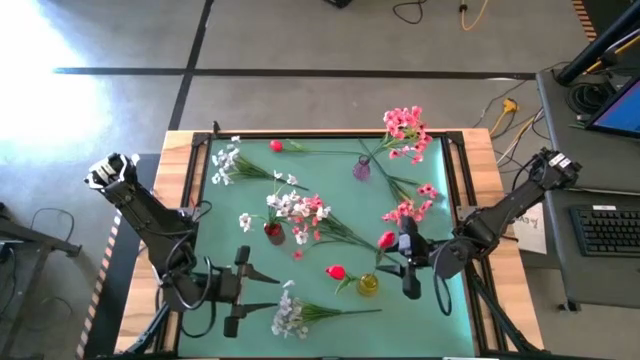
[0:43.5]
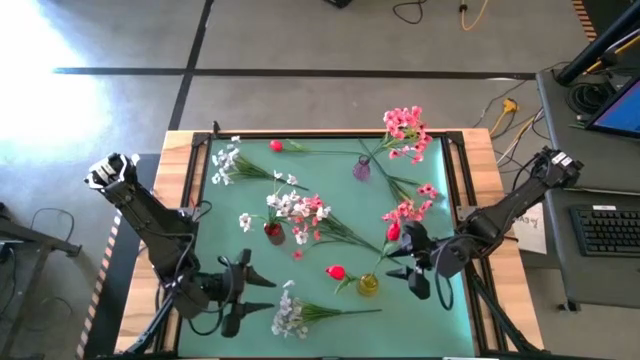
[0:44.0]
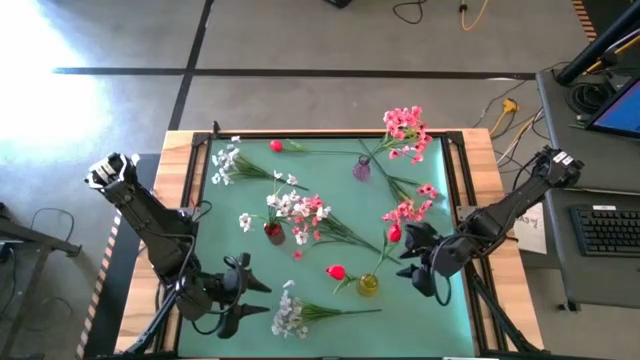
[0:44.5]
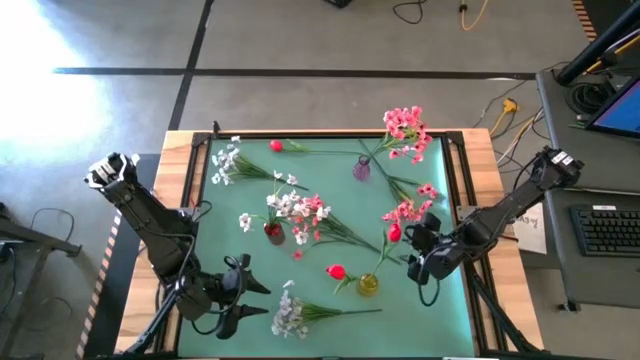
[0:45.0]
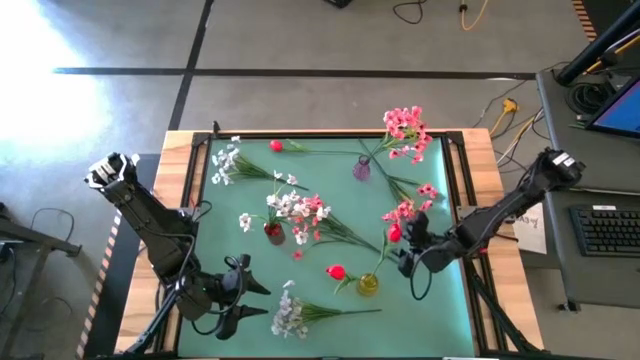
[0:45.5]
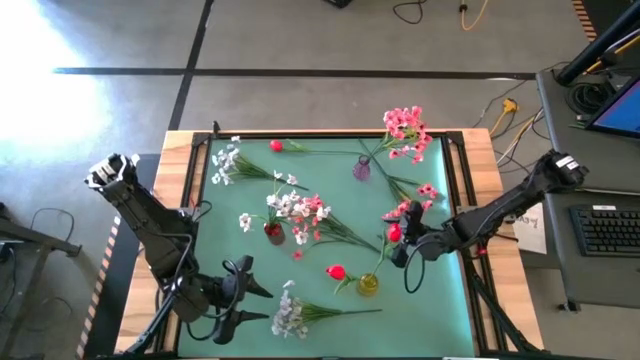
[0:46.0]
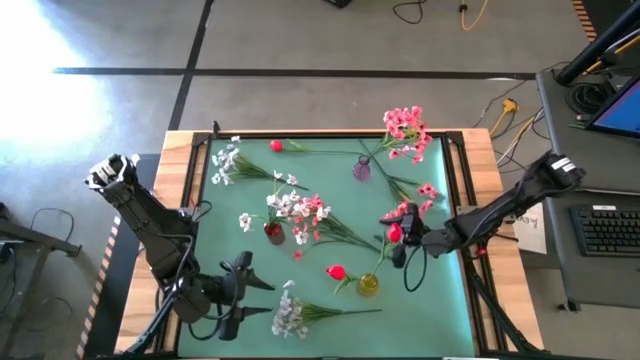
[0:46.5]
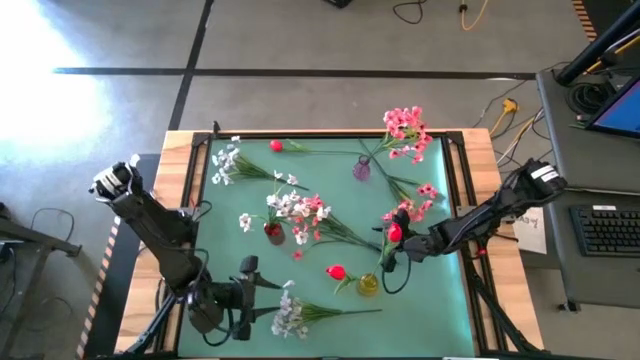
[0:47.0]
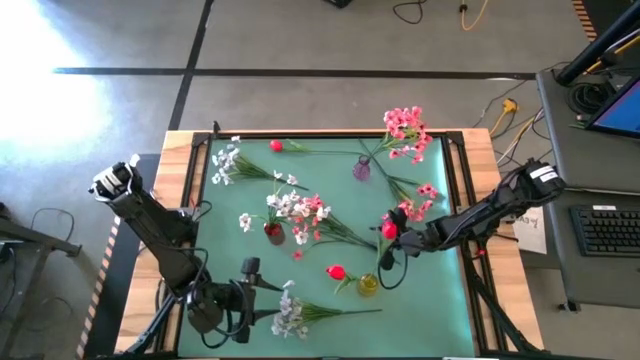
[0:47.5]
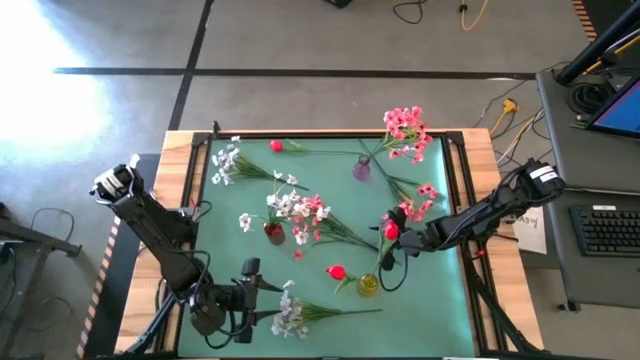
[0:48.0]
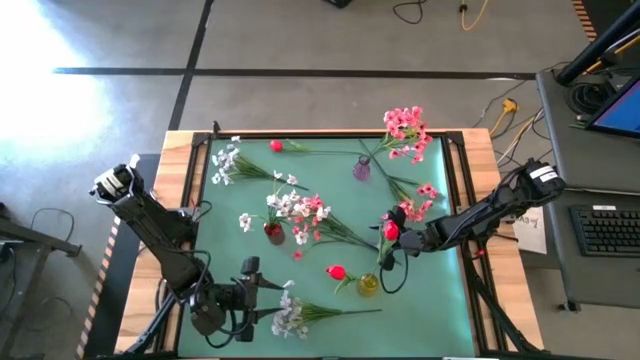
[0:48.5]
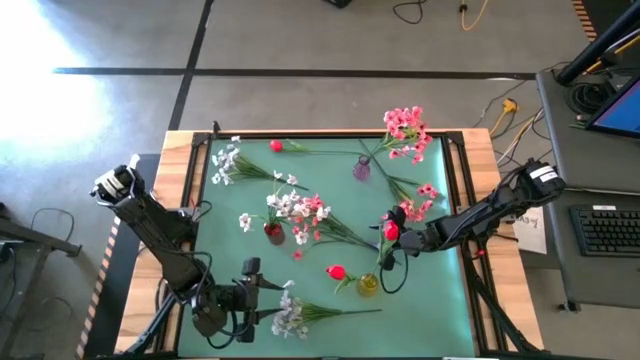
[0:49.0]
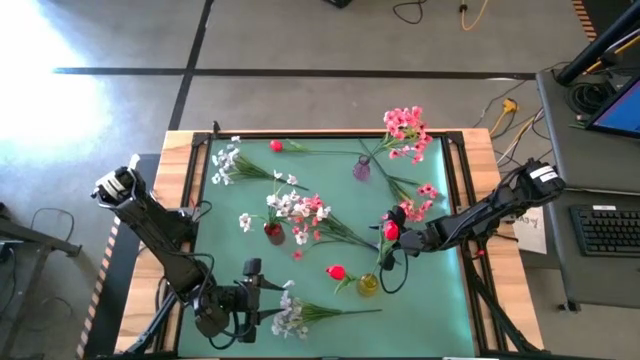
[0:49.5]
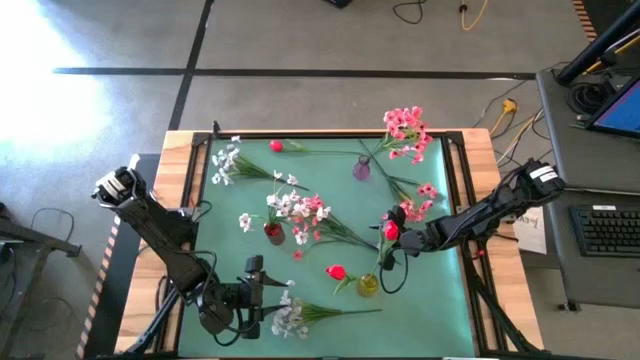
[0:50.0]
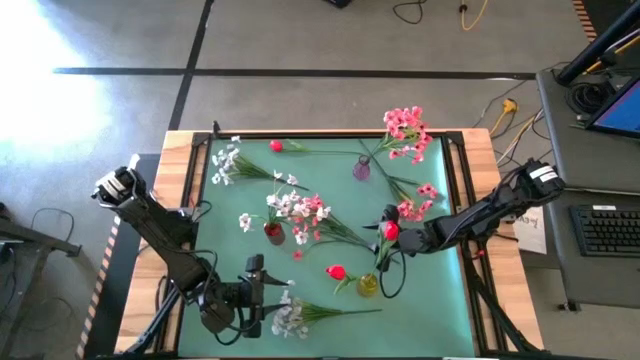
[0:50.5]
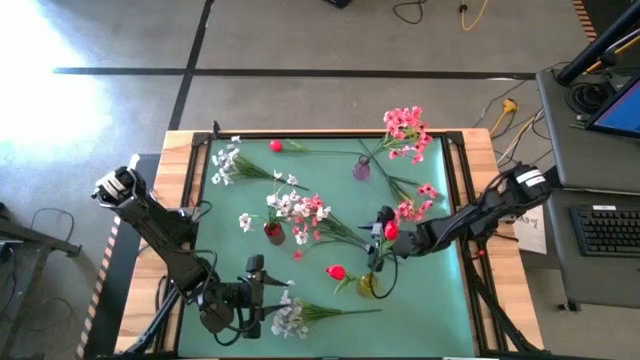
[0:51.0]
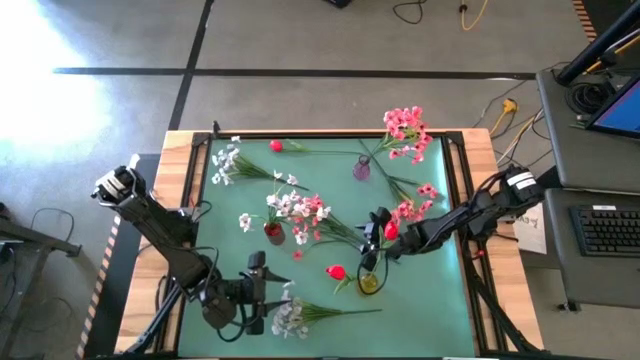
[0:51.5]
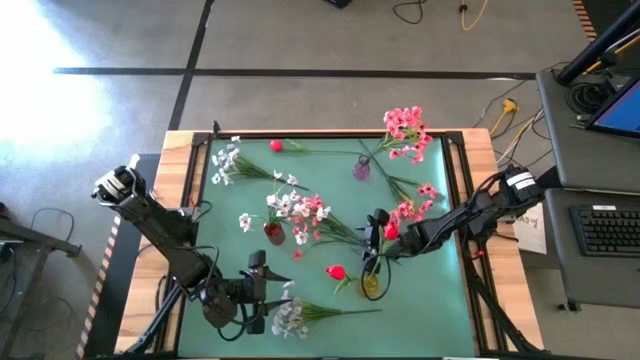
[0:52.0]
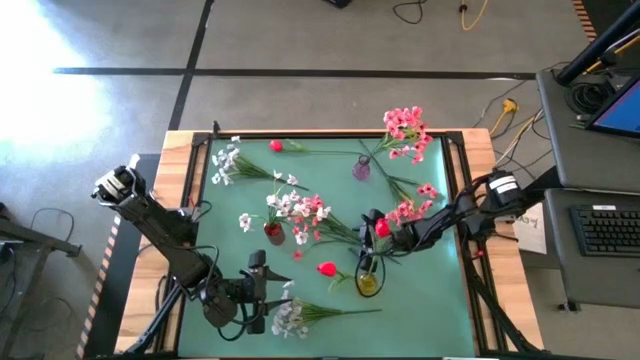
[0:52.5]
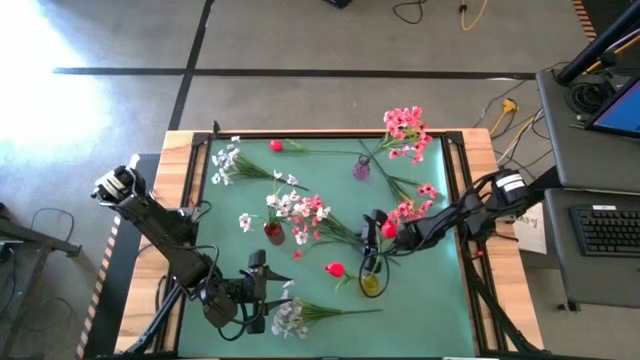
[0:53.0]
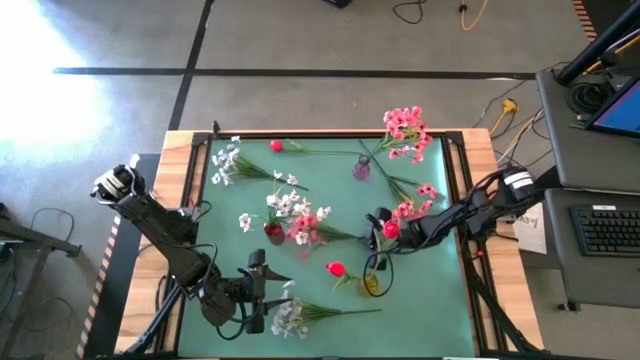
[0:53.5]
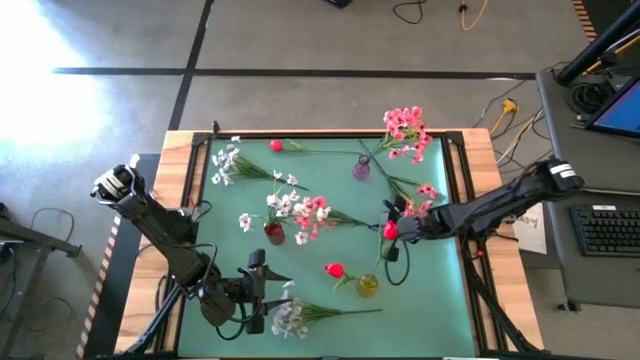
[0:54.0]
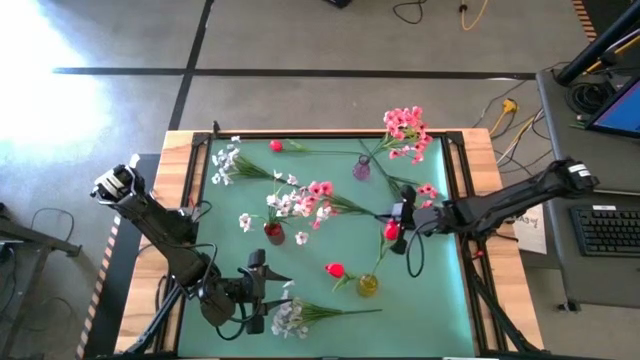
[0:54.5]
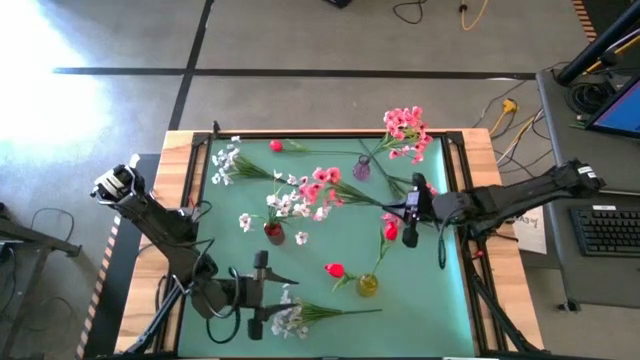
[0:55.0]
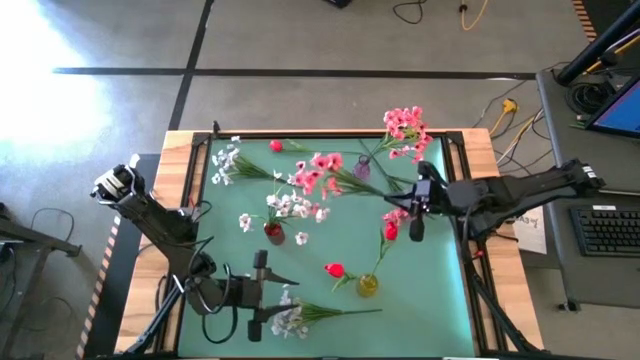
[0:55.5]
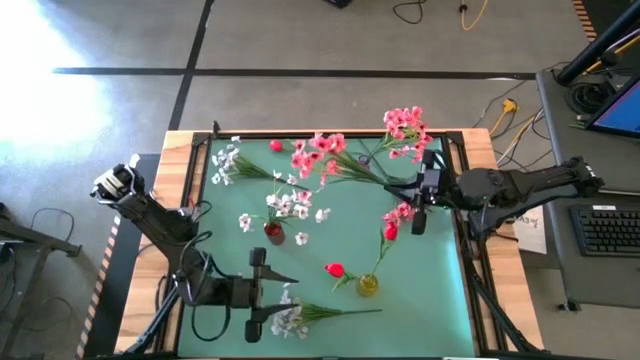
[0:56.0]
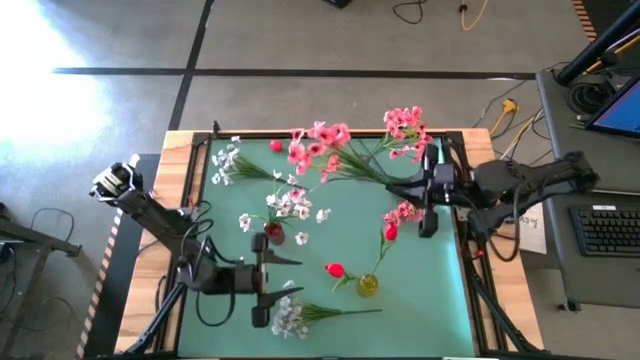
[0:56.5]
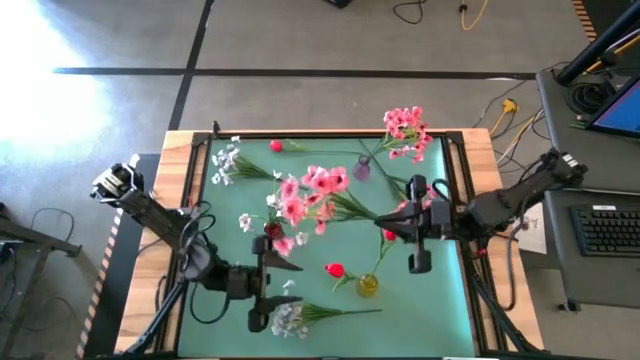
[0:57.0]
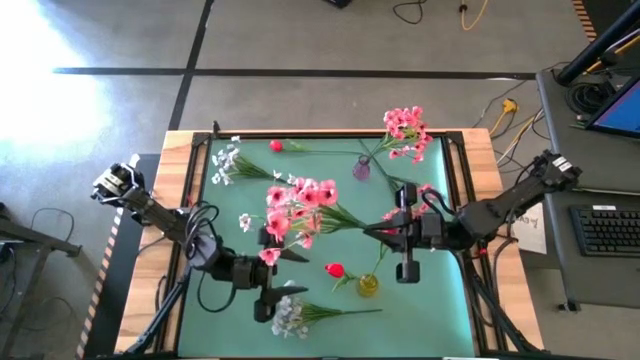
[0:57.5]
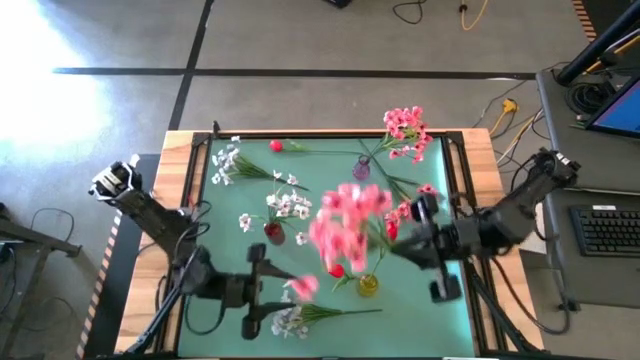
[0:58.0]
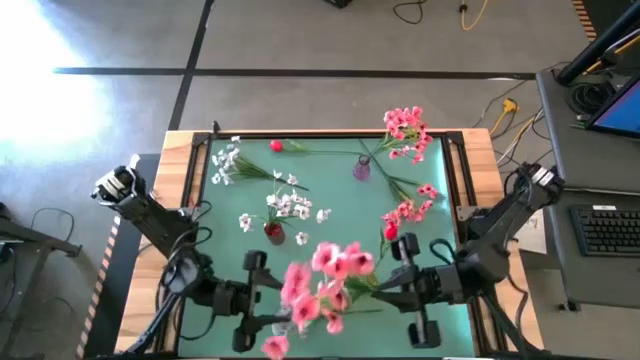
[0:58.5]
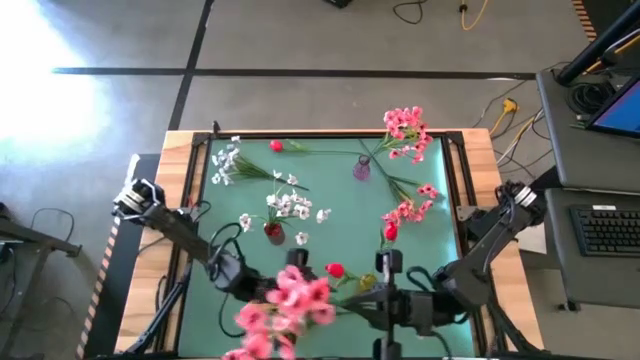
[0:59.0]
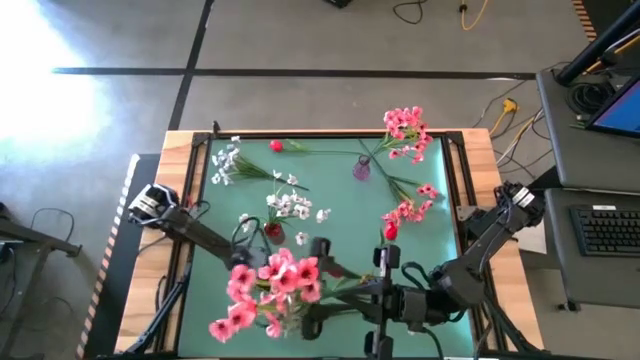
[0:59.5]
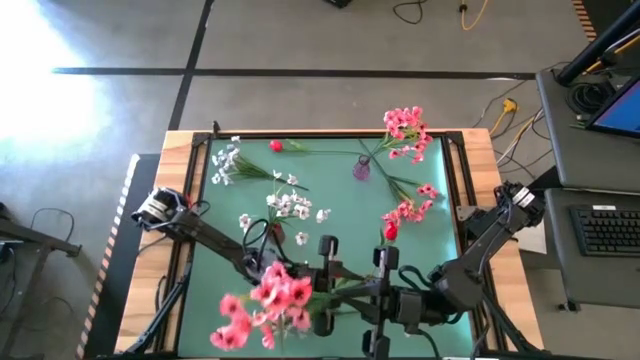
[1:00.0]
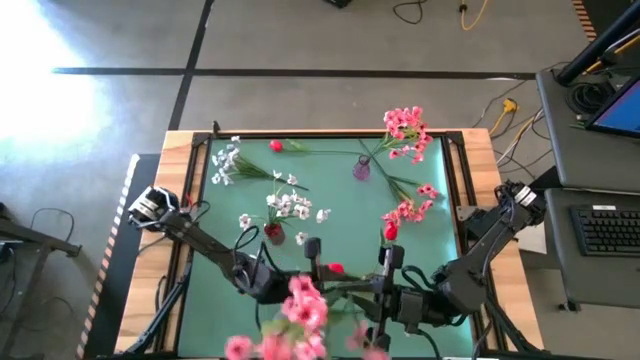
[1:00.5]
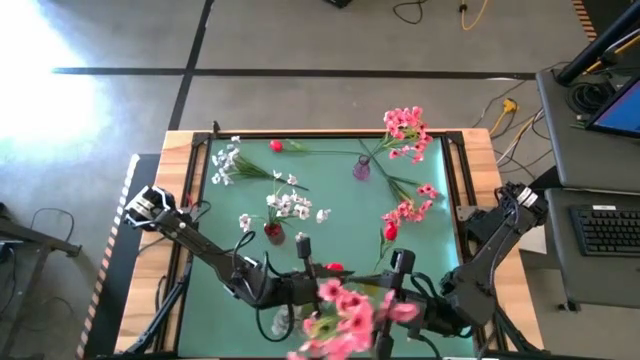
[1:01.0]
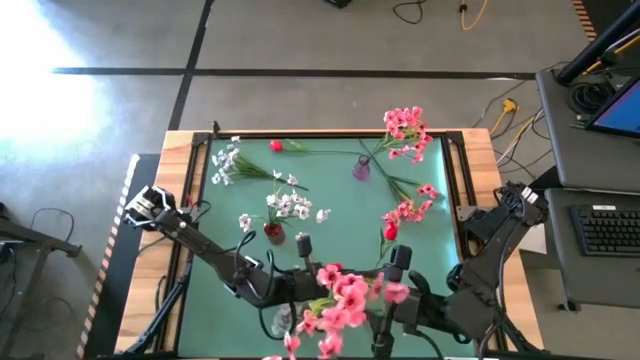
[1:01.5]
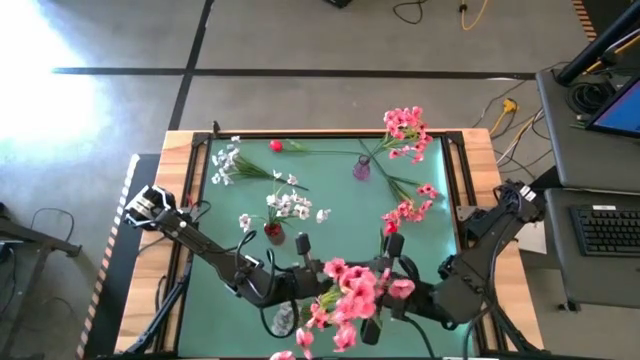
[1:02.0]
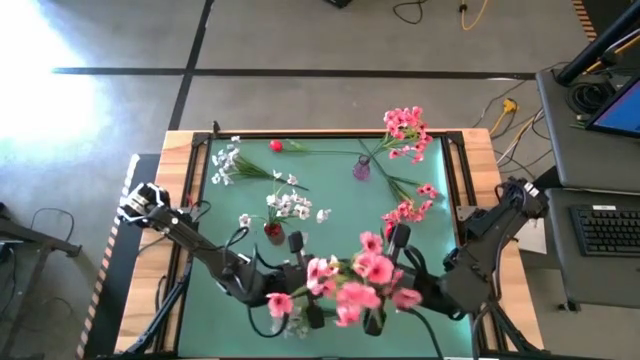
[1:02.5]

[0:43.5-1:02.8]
Task: Sort flowers into vase by color
Put the left pink flower into the purple flower vase
